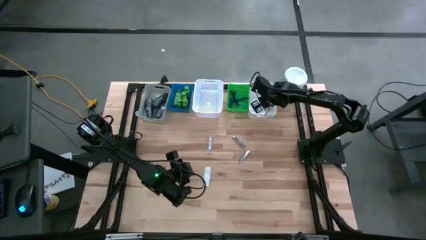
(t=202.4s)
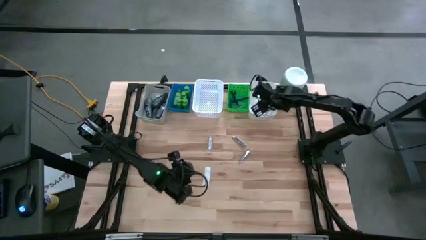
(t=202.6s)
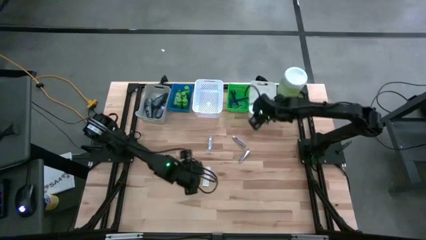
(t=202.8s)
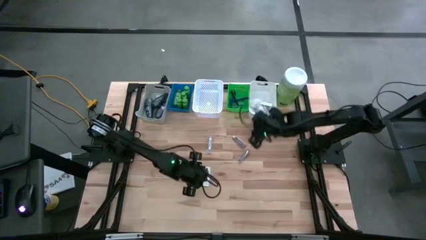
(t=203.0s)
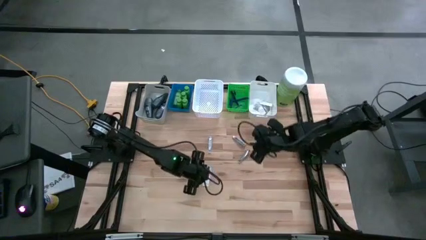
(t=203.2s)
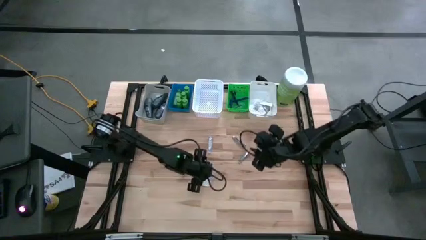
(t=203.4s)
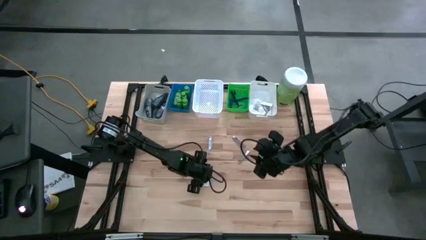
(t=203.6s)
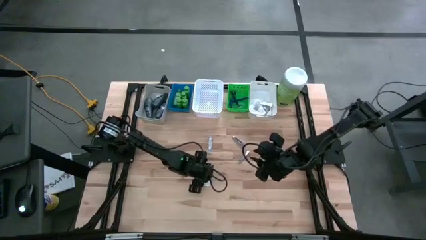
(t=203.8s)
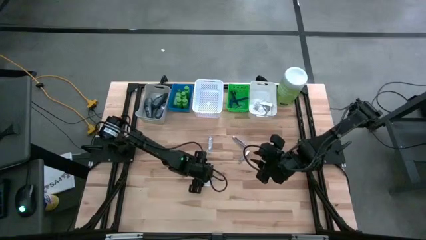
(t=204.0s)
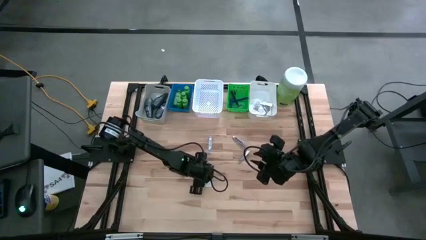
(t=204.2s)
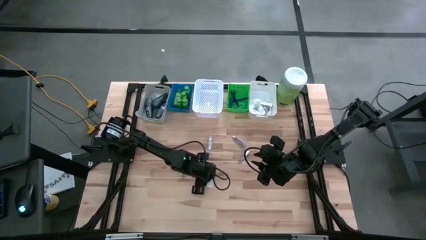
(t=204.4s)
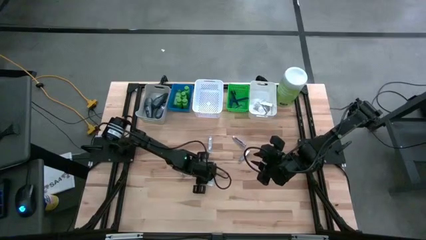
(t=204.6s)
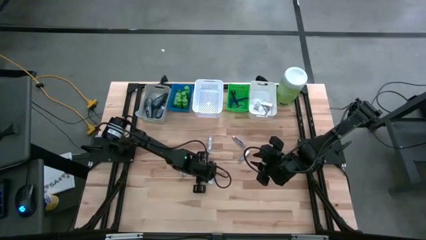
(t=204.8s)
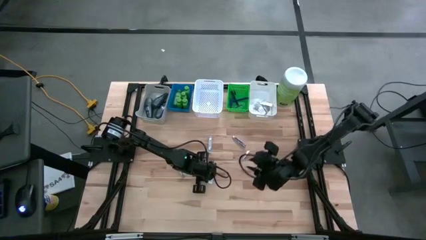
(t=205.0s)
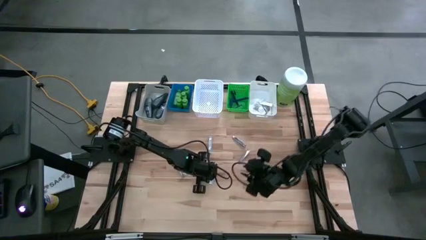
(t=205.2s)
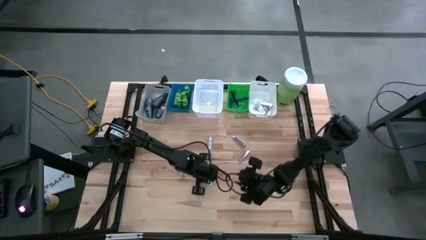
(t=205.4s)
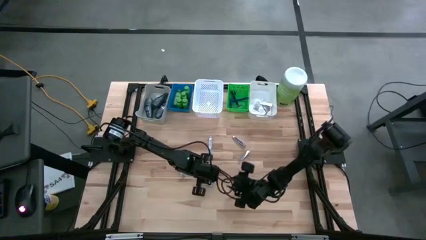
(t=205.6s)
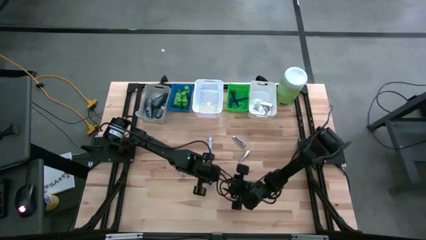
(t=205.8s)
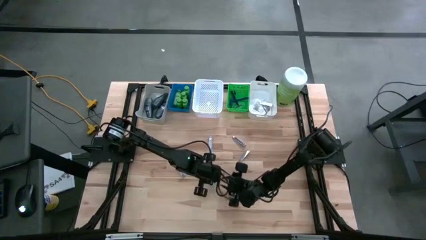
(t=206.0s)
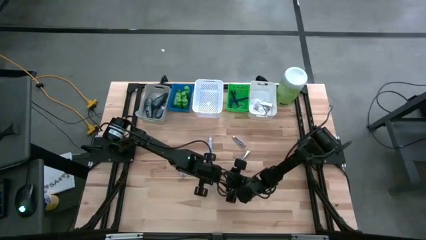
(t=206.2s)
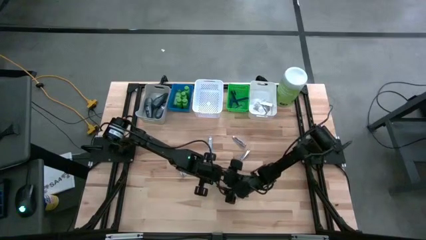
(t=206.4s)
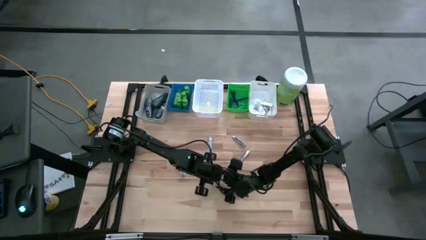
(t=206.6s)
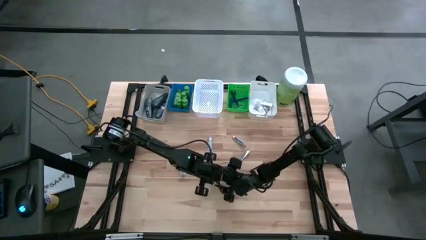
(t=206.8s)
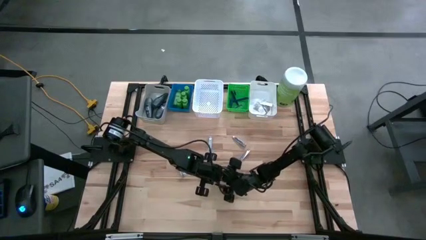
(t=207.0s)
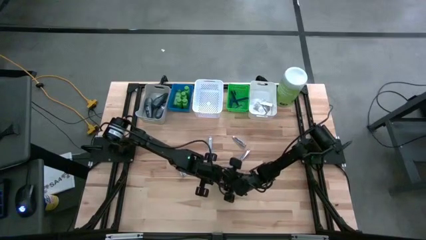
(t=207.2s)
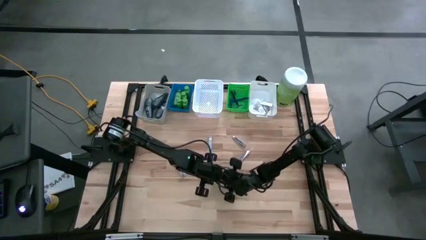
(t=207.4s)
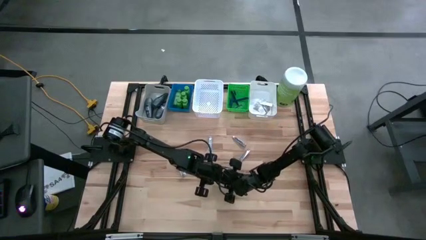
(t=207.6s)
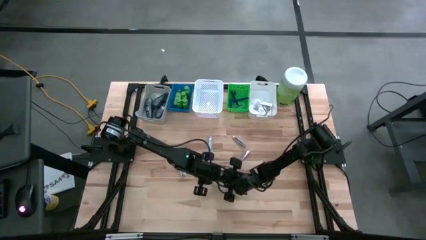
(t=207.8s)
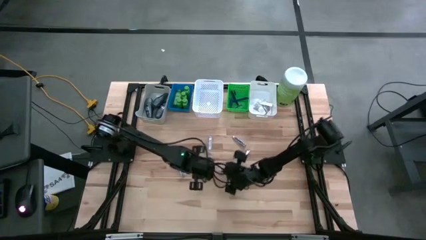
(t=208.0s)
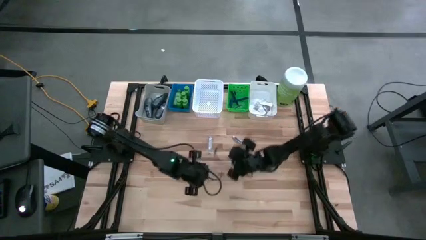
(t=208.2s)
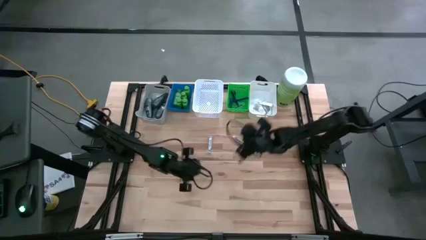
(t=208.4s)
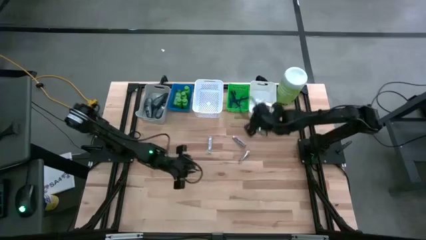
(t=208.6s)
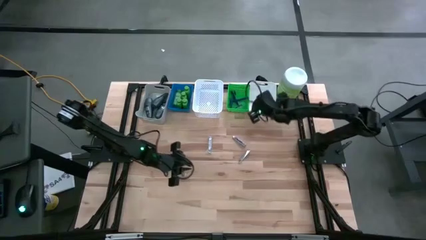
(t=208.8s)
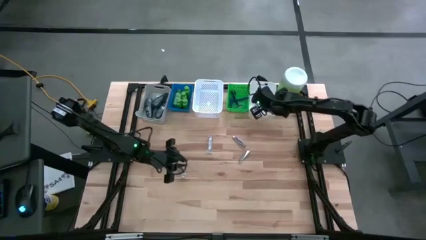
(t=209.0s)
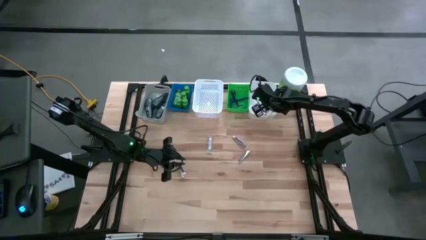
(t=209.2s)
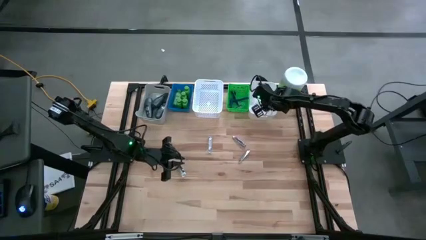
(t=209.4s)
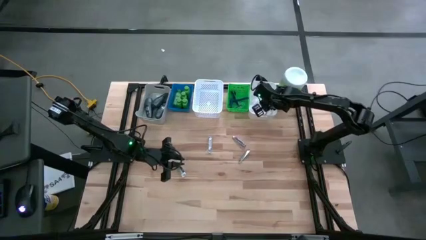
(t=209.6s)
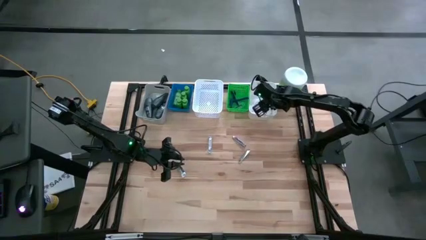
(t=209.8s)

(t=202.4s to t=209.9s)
Task: Pick & Place Travel size toiletries
Put the bandage into the right white bin

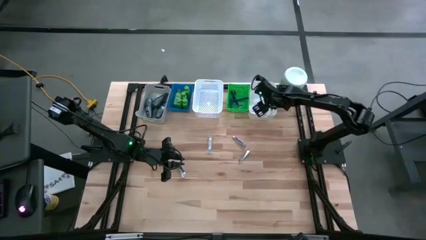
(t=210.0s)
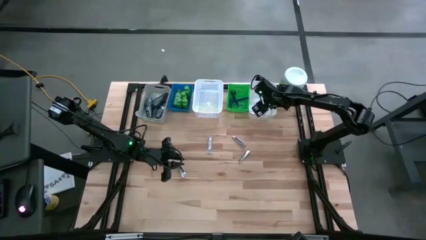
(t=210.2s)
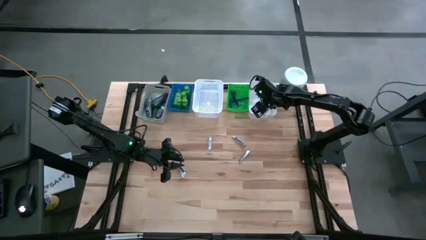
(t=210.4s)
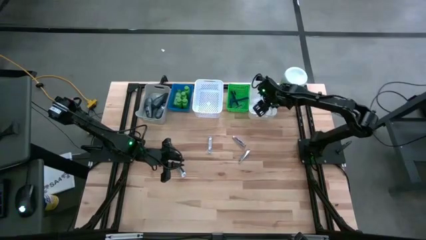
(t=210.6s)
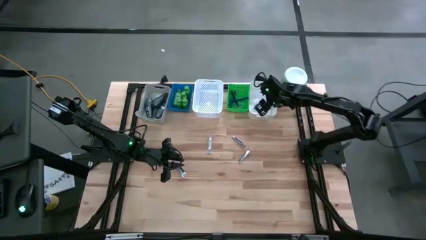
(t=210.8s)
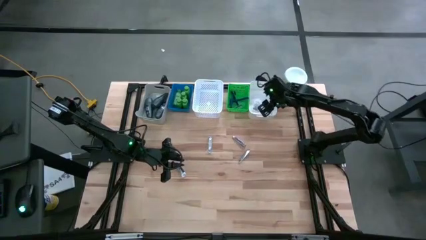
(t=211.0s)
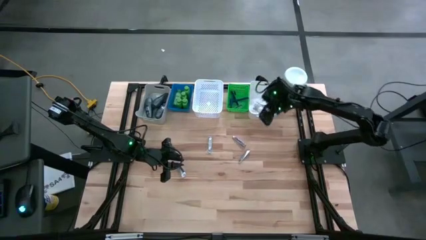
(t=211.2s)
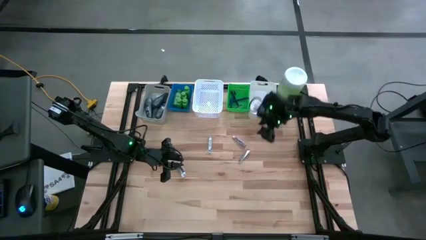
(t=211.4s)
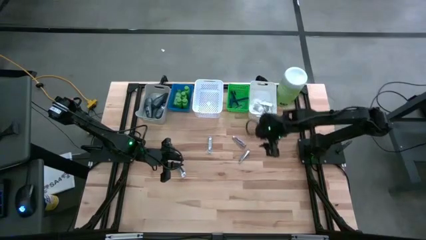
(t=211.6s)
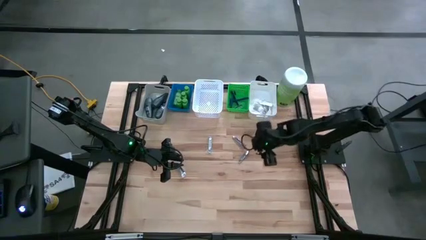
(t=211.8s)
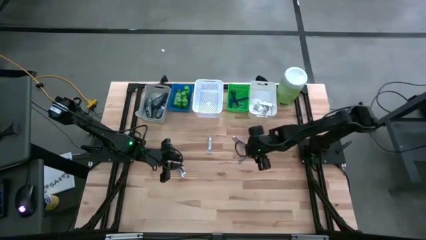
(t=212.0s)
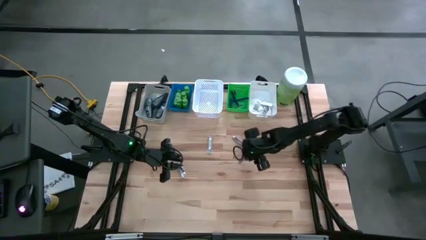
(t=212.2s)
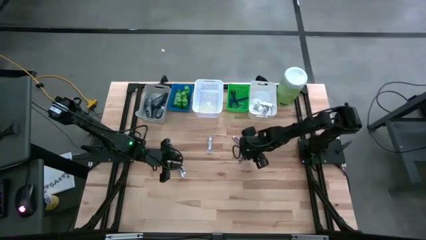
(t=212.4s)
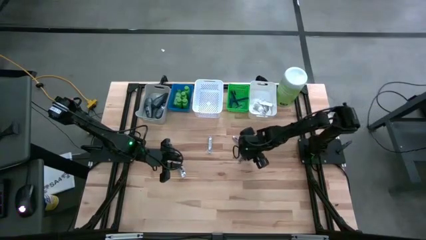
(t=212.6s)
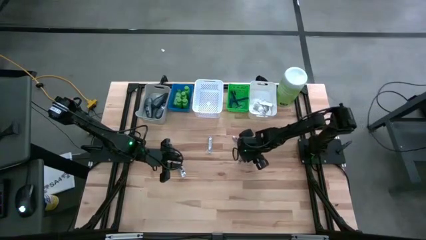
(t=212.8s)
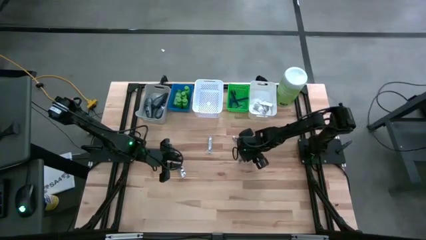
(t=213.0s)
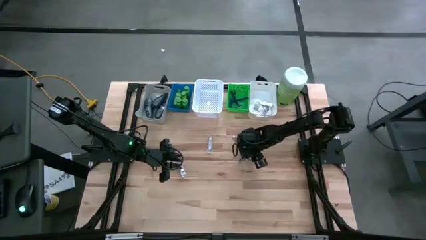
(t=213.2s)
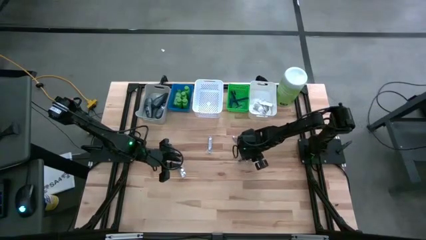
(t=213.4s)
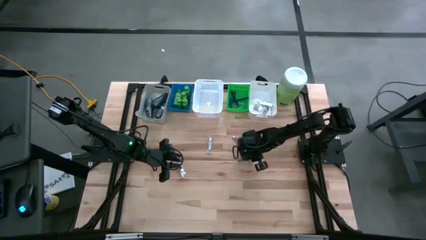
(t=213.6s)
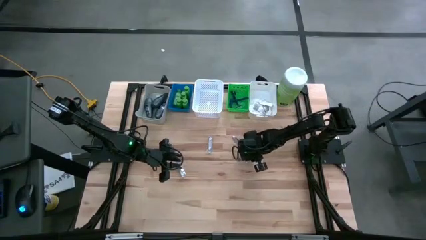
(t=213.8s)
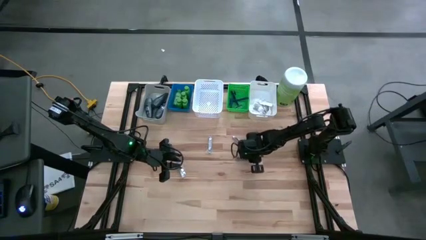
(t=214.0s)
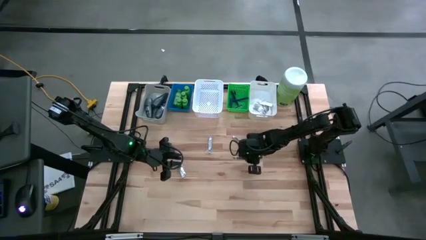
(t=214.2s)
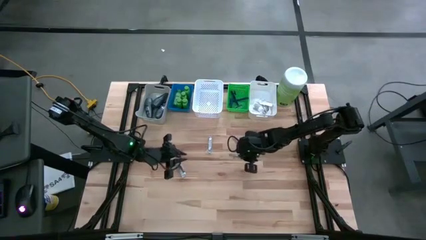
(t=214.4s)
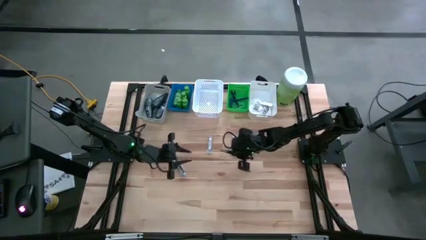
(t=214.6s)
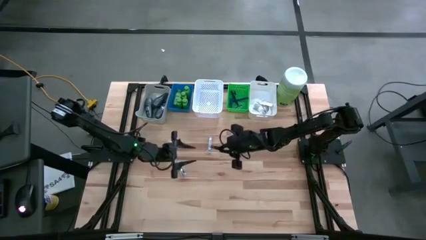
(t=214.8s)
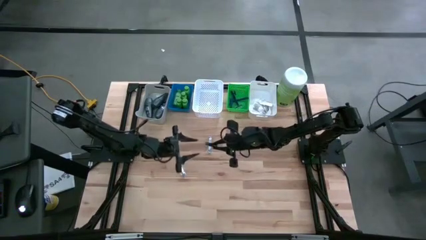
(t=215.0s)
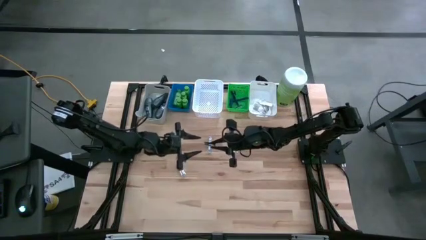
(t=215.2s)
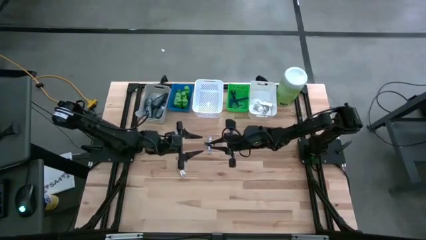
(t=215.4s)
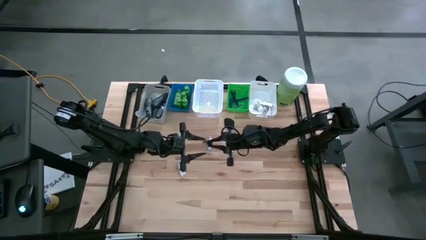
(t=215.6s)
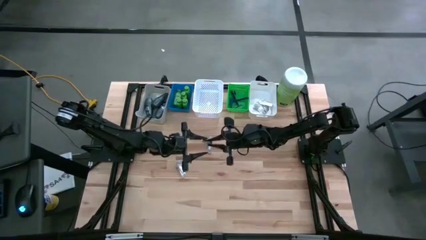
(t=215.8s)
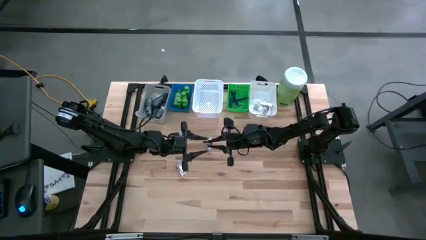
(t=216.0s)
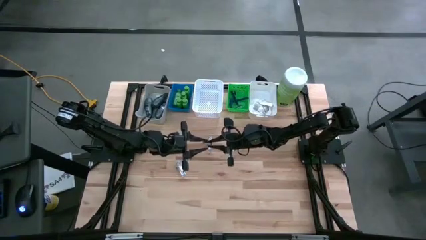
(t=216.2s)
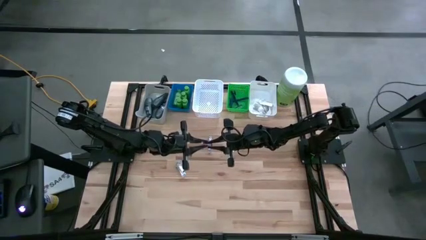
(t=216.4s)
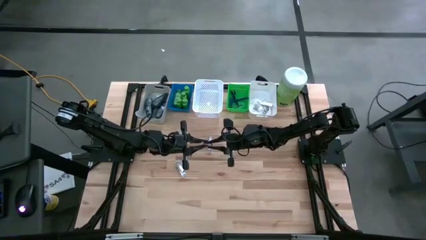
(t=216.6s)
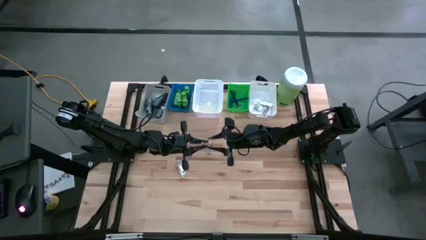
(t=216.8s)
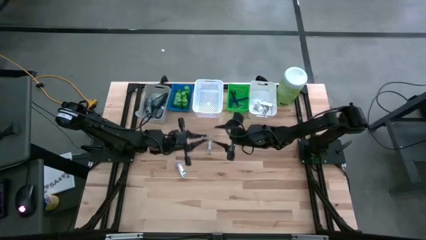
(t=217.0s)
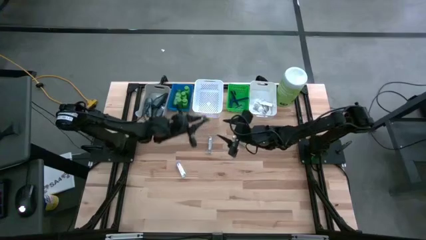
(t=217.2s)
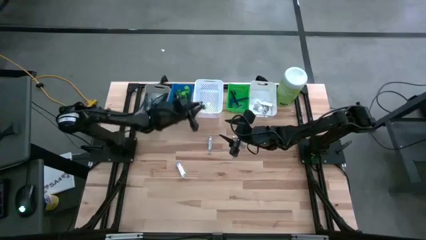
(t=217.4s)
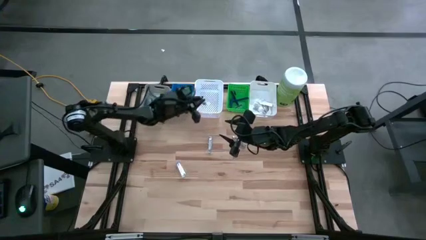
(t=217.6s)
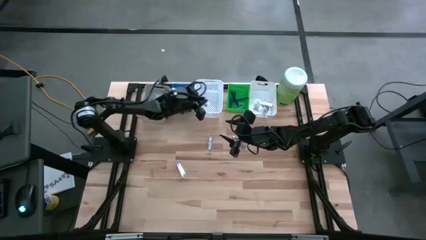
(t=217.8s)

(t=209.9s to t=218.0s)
Put the nail cutter into the left white bin
